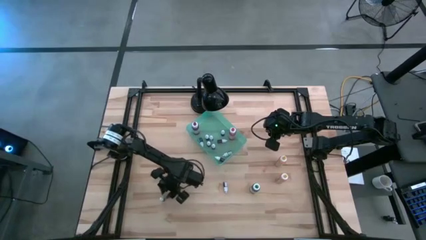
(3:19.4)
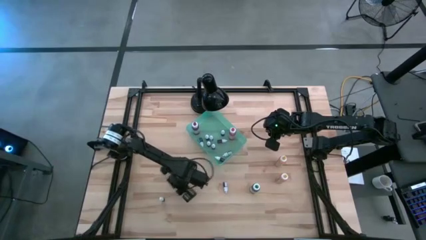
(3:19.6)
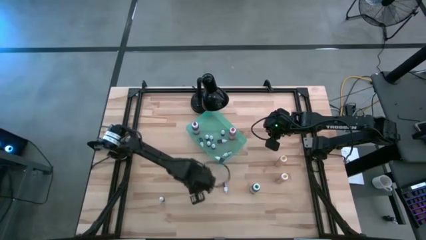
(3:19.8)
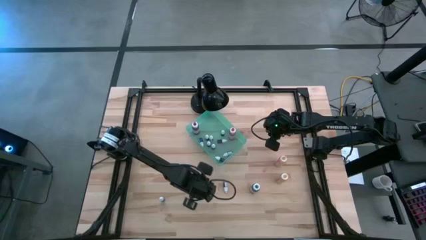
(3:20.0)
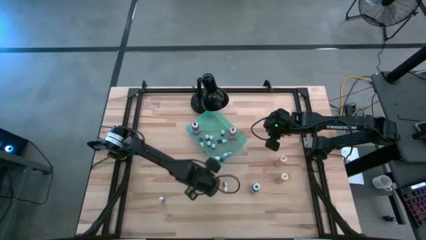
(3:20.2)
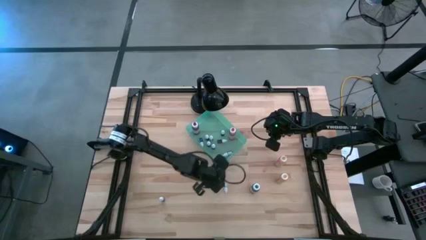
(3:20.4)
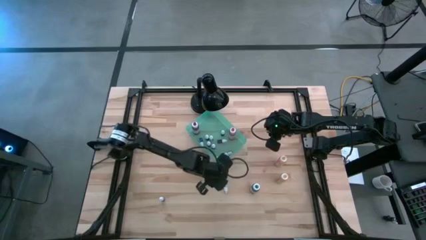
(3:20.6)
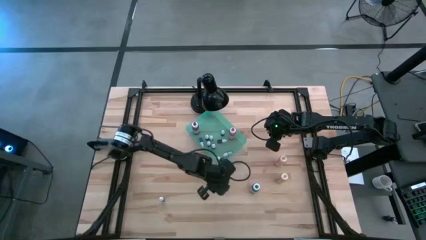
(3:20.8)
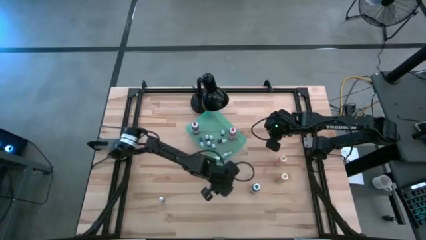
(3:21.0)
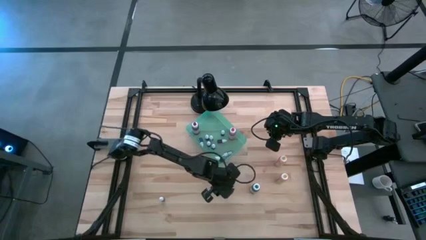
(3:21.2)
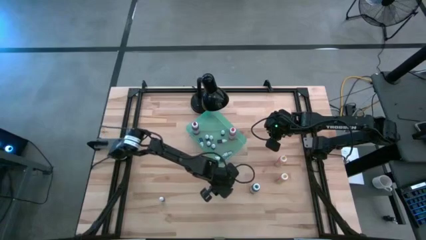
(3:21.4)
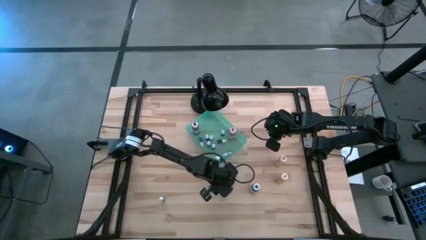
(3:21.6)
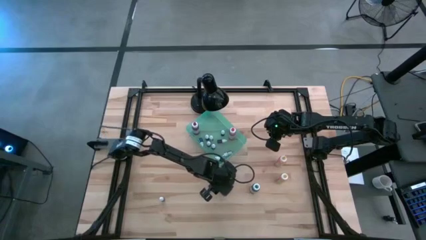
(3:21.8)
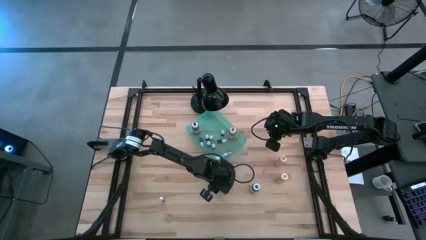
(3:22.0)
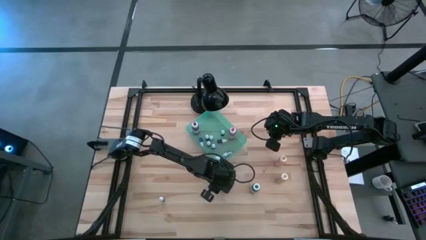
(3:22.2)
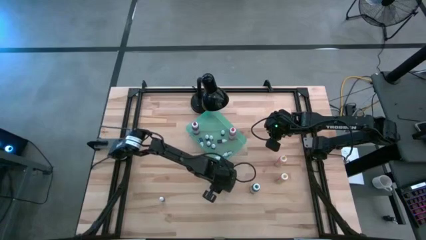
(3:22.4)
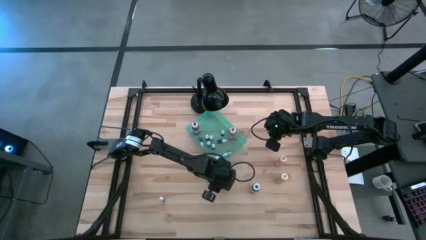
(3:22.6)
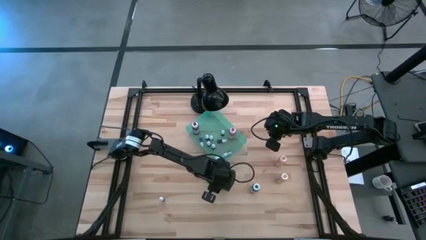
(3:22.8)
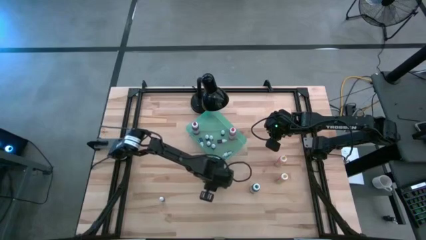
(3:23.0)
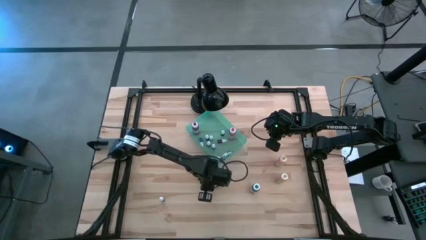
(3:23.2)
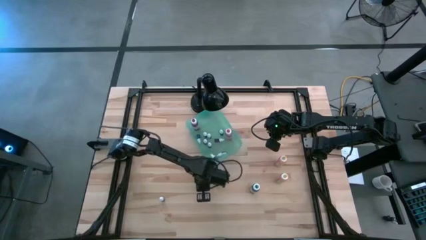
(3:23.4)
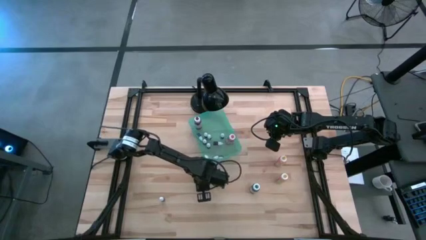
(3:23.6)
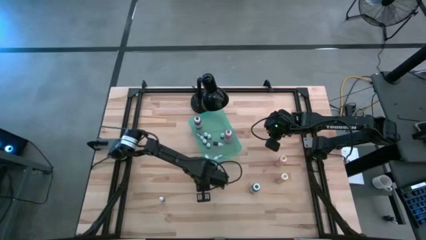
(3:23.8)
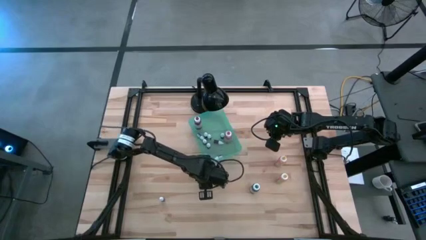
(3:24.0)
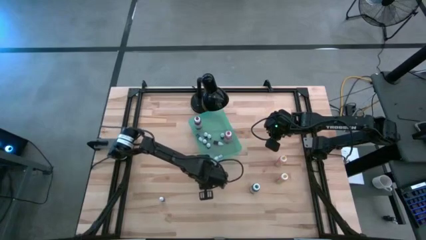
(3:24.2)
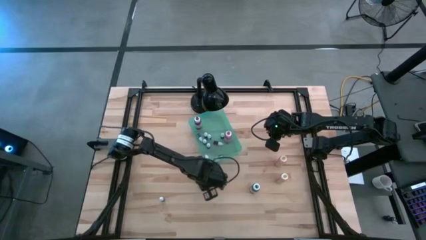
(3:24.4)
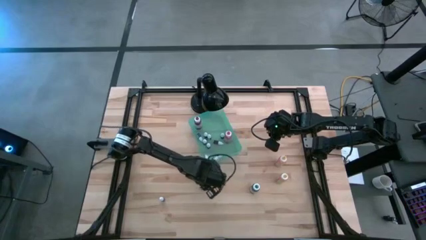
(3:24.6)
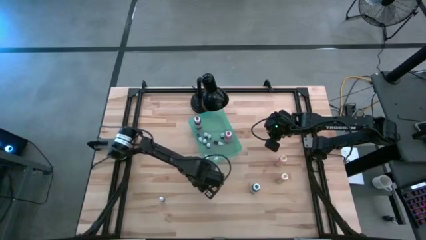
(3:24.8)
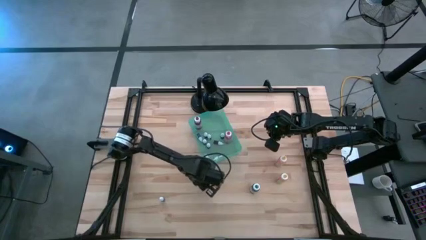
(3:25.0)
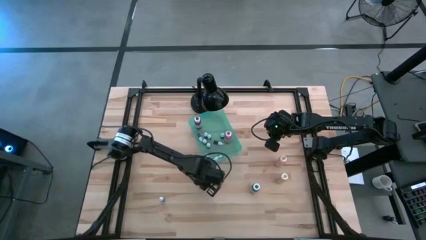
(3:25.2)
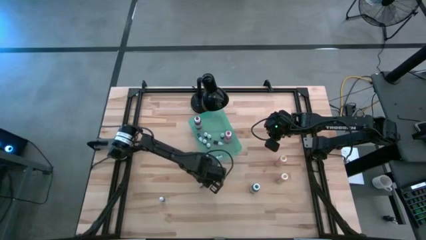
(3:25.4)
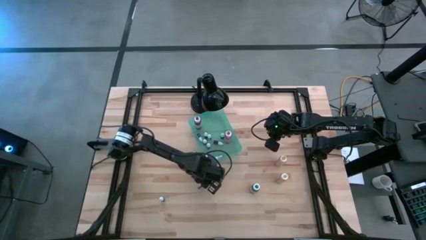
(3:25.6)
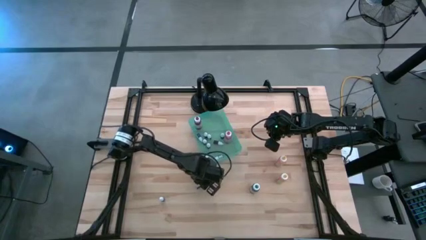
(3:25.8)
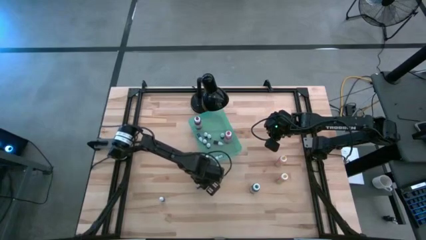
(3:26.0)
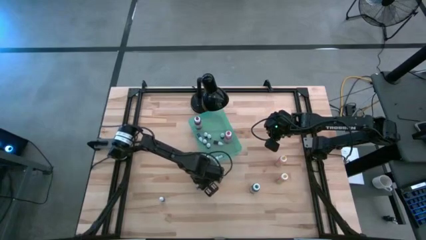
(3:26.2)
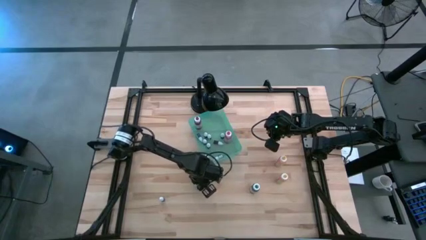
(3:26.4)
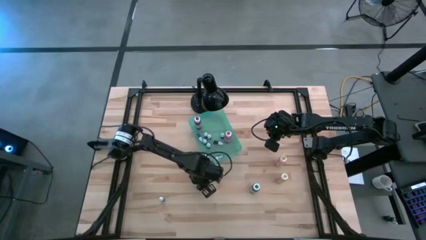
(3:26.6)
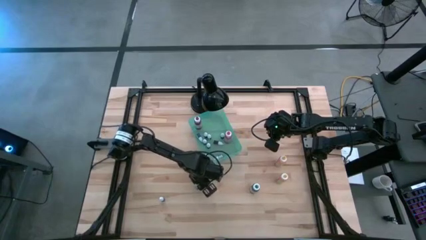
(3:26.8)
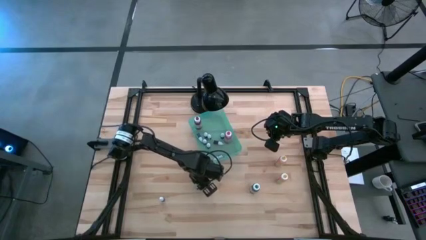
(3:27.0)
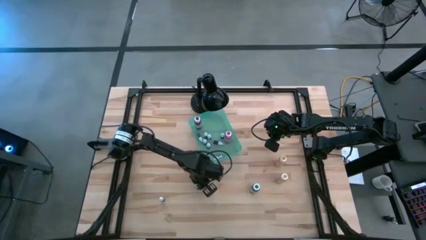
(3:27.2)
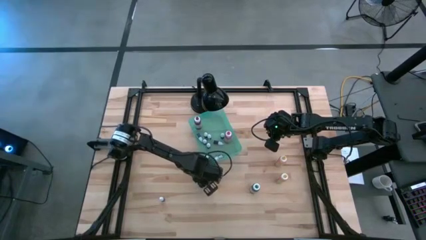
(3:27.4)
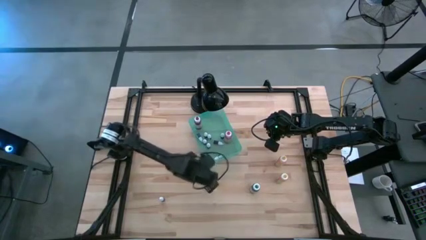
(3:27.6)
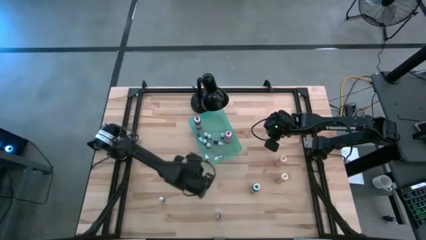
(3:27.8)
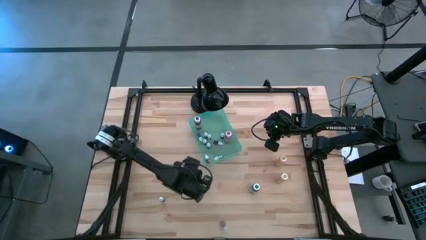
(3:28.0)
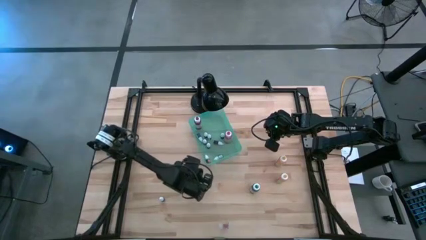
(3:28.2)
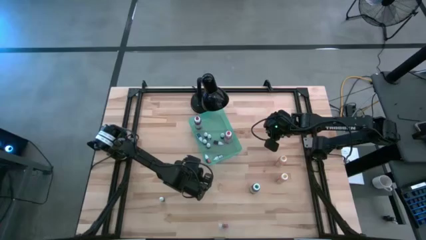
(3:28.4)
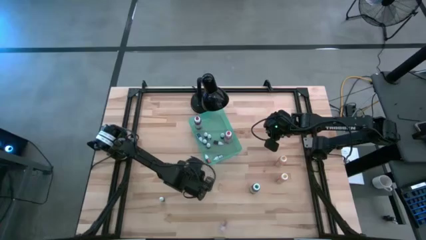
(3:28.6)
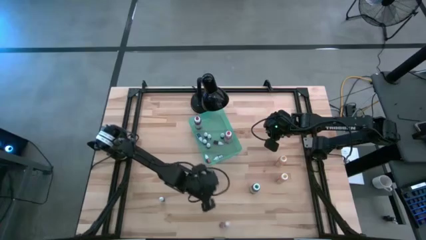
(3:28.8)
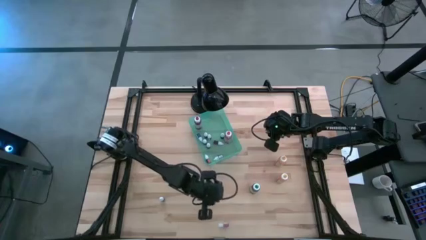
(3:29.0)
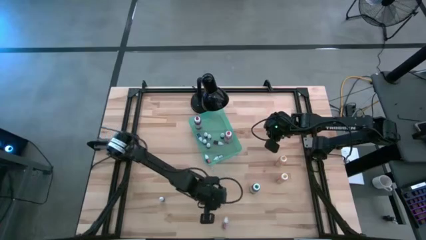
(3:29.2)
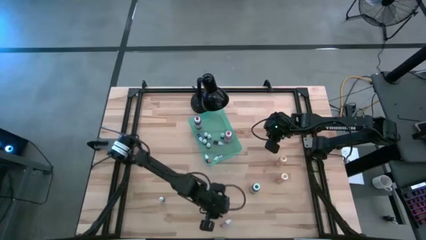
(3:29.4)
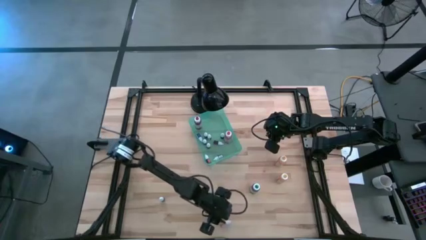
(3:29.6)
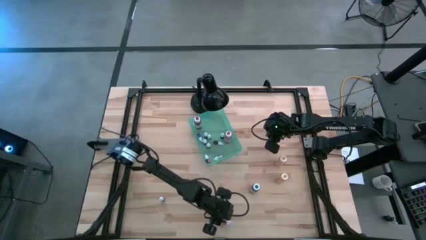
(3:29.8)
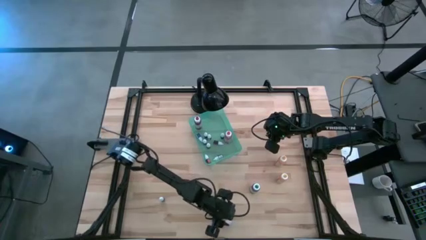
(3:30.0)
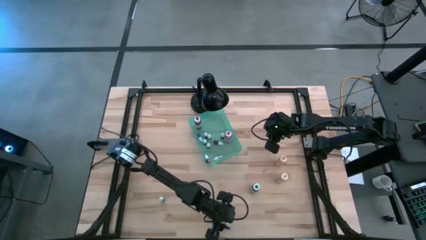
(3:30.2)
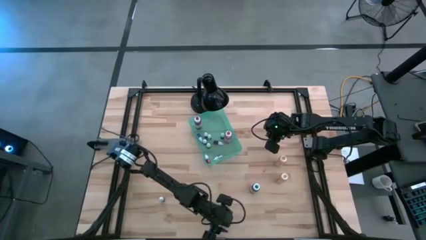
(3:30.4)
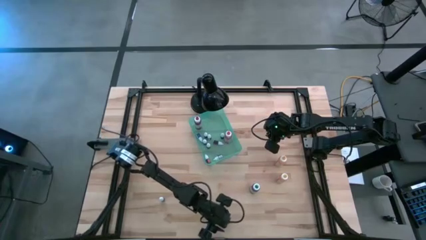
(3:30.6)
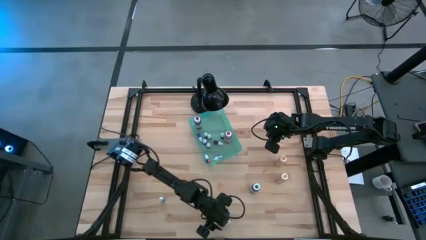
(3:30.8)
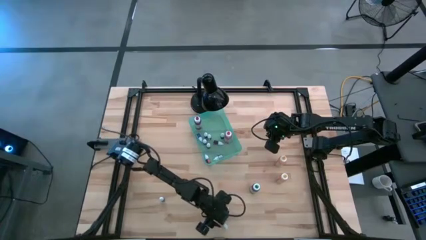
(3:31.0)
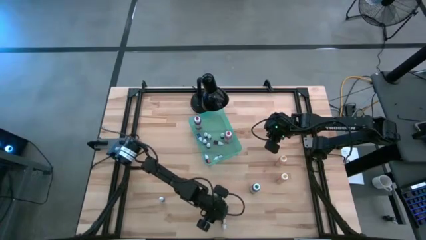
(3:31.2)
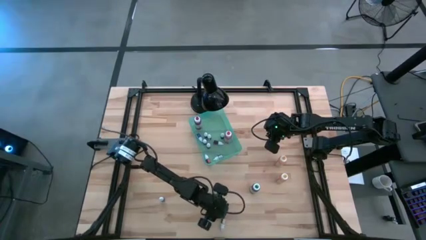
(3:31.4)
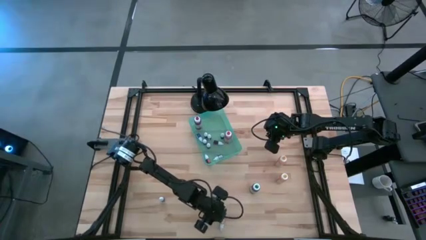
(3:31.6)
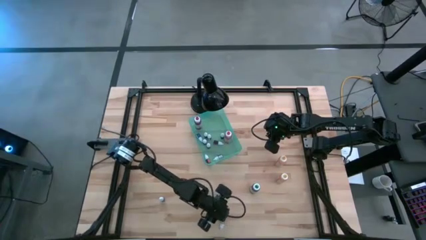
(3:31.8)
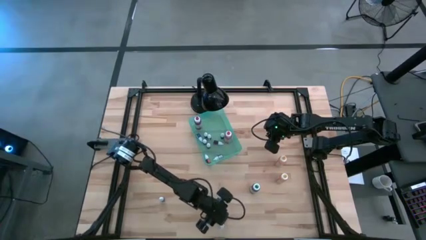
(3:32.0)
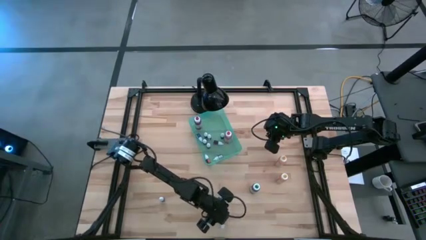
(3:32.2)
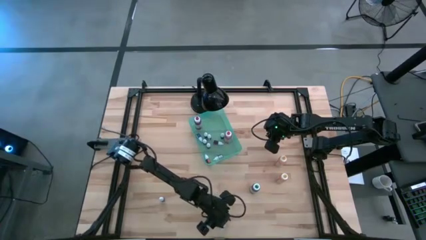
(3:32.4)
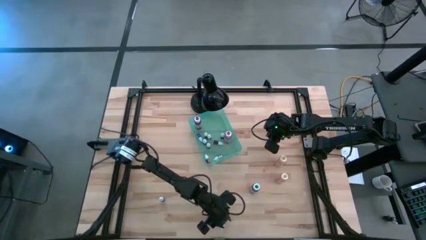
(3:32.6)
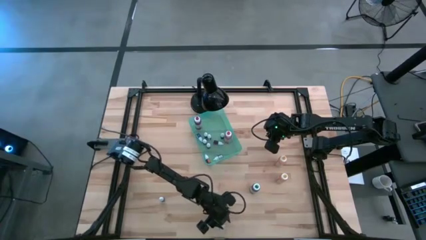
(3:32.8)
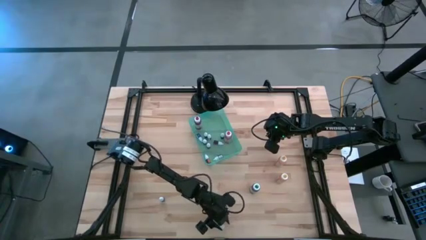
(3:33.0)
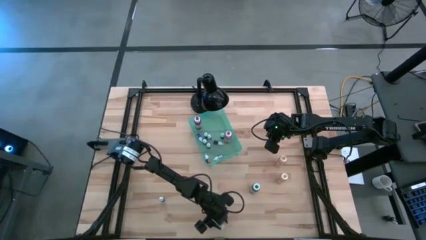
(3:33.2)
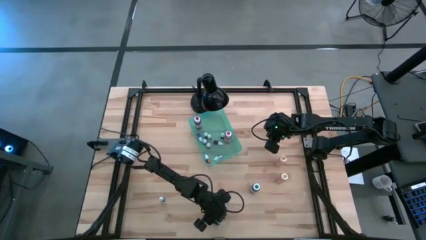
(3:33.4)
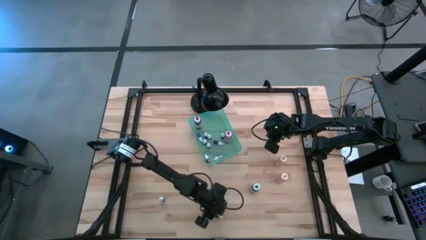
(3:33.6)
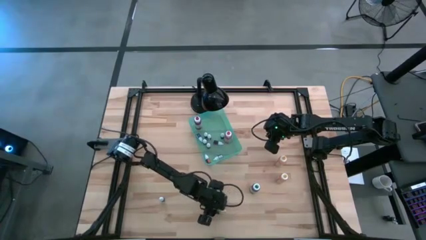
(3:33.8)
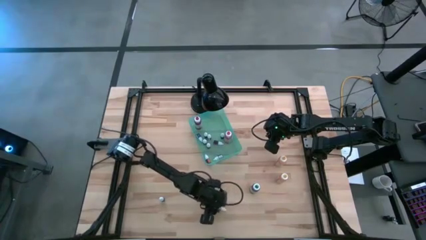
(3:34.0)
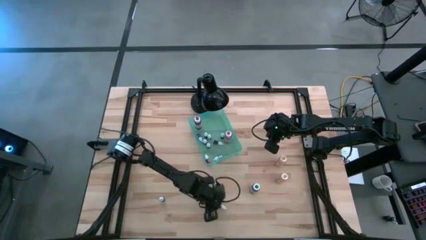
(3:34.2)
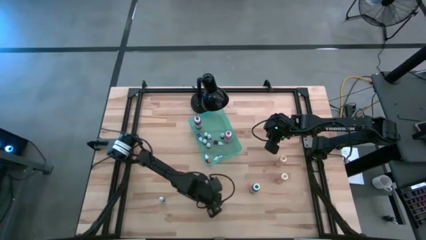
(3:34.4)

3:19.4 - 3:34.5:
Task: Pick & Place food coloring
Put the small pink food coloring bottle into the green bin

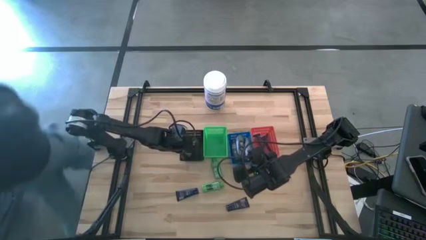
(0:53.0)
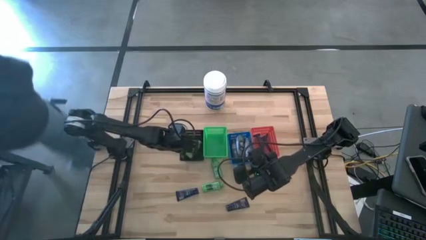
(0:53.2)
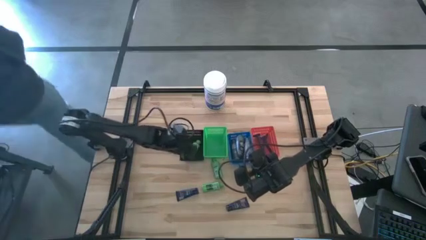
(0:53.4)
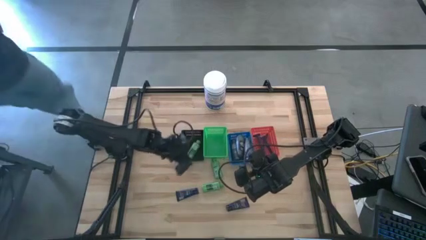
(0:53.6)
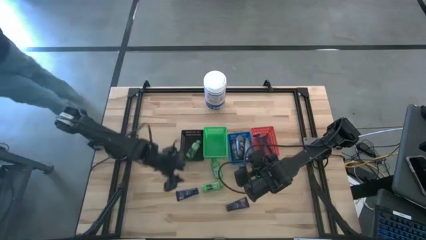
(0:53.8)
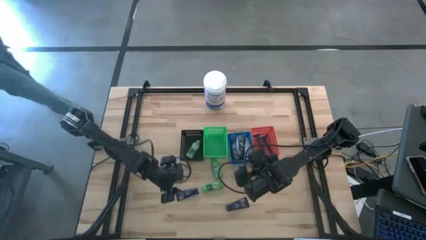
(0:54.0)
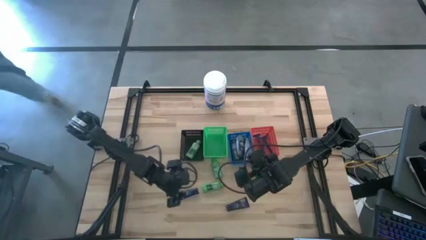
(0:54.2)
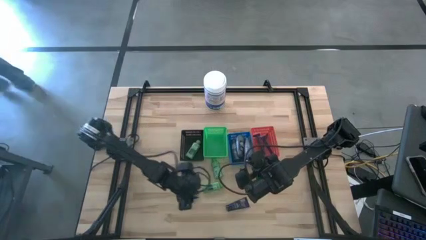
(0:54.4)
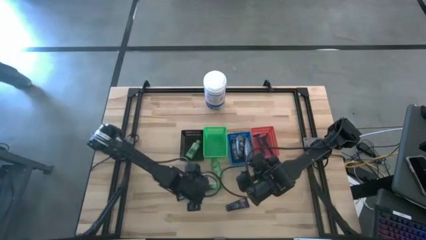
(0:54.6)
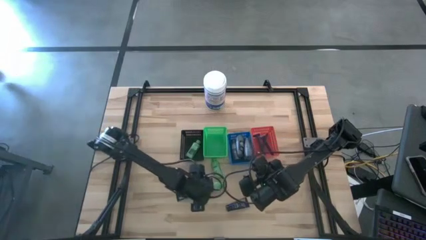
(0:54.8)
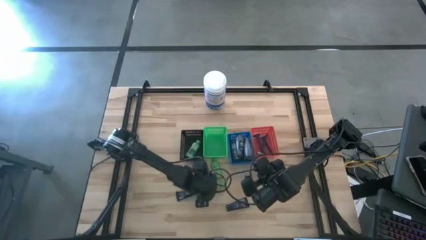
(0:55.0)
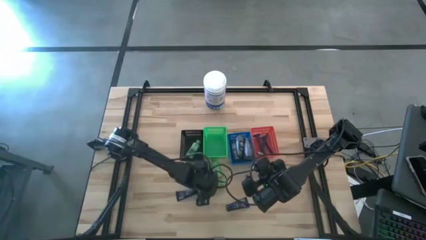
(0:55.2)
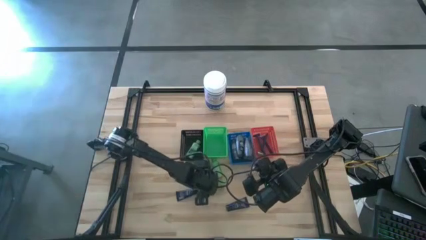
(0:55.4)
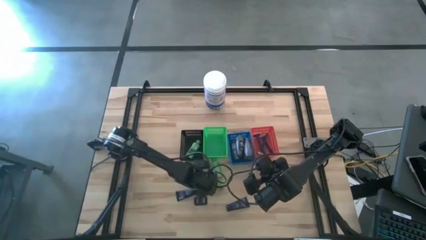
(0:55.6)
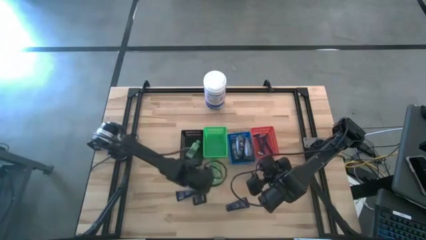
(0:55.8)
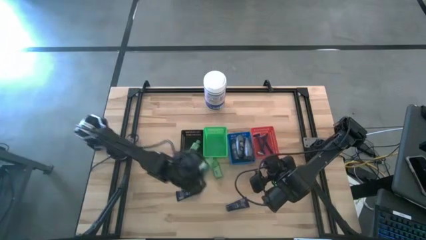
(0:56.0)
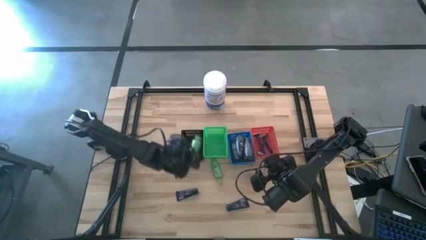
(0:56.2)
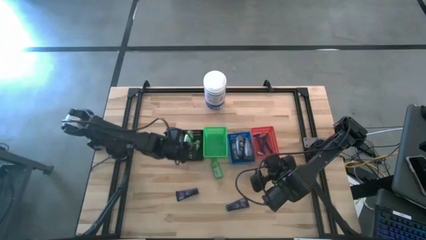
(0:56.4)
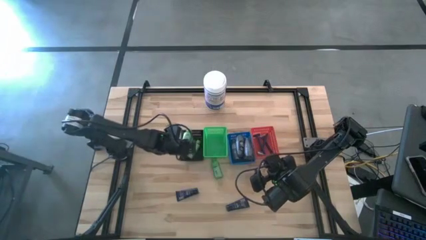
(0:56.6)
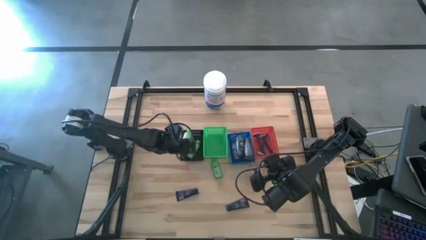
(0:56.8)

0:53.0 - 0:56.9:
Task: Pick & Place Travel size toiletries
Put the shampoo into the black basket
